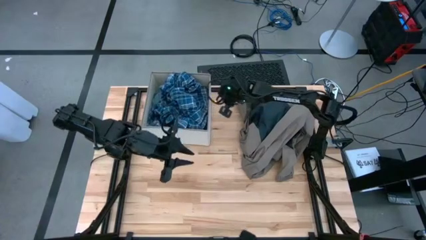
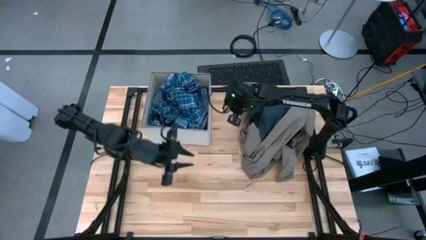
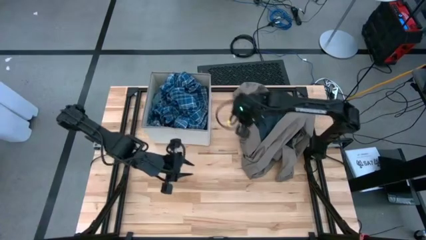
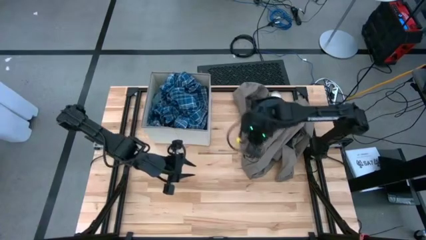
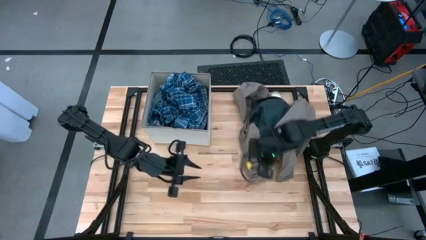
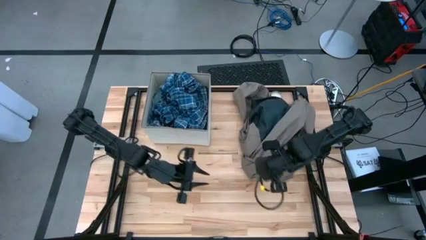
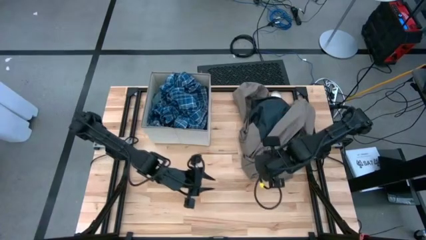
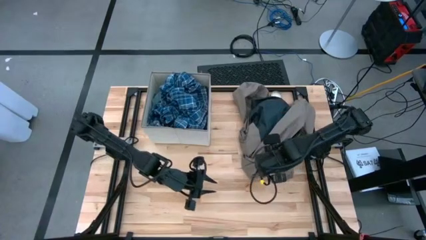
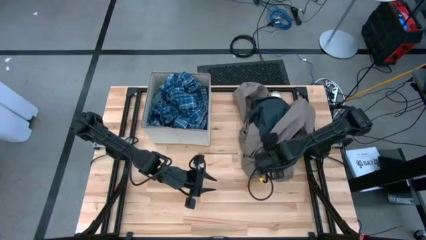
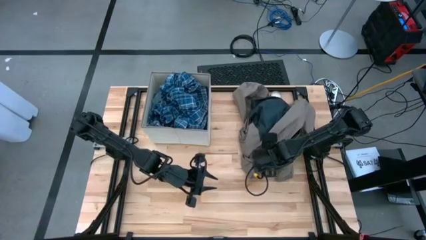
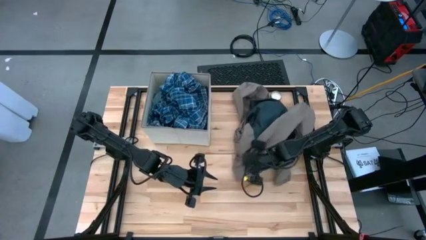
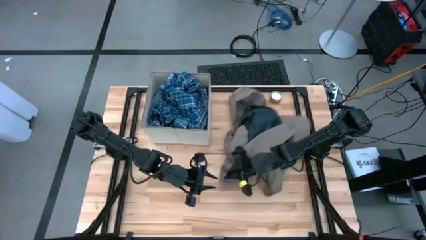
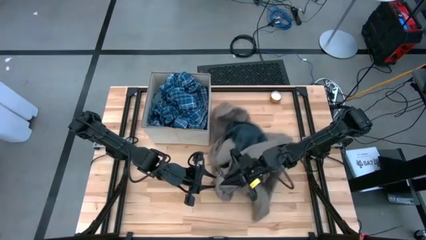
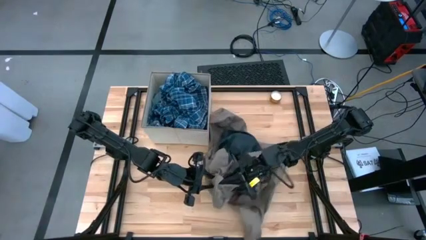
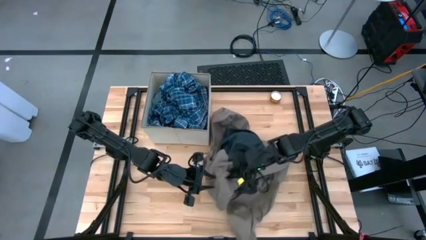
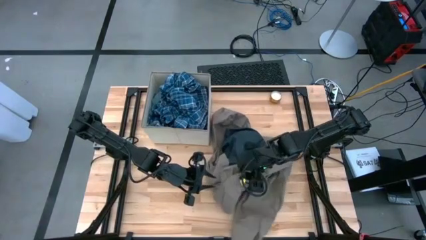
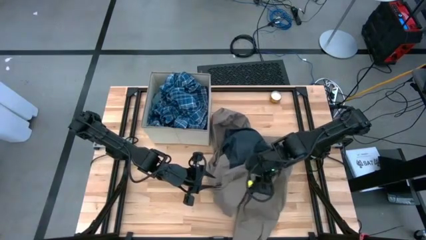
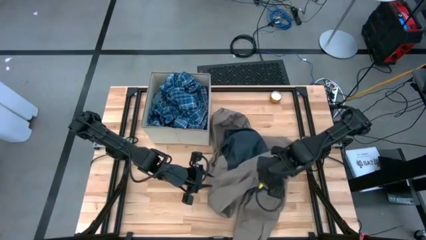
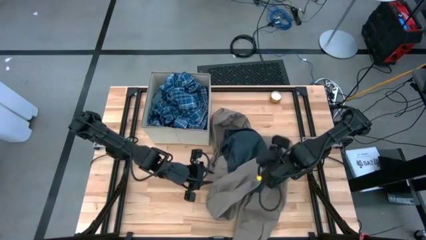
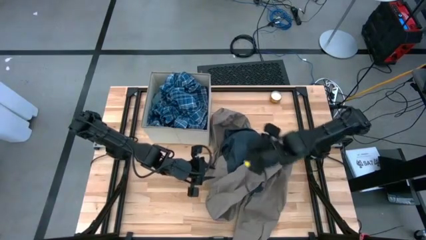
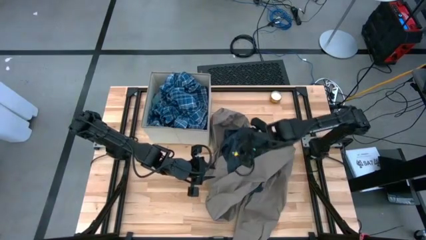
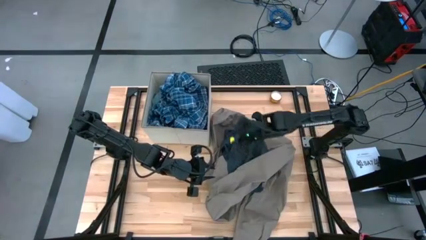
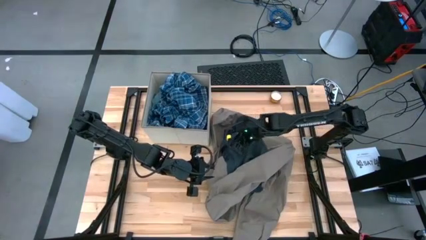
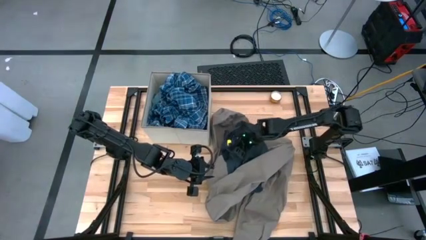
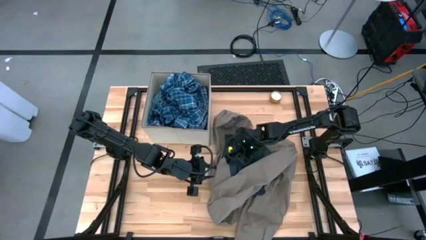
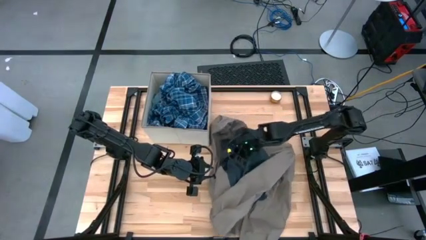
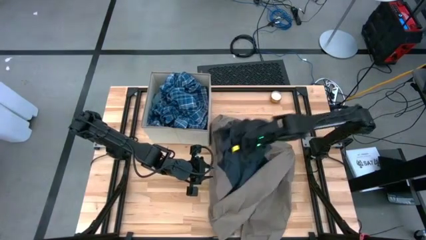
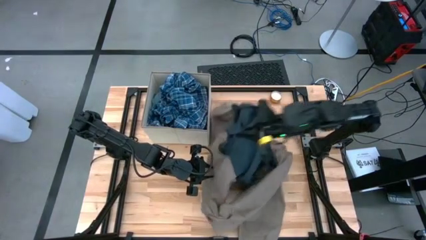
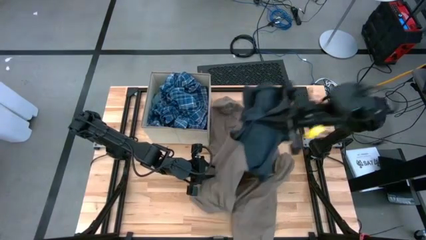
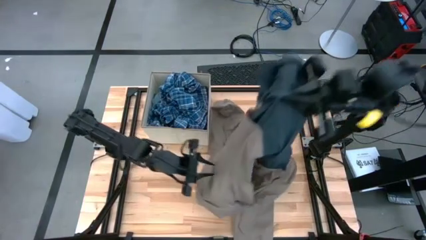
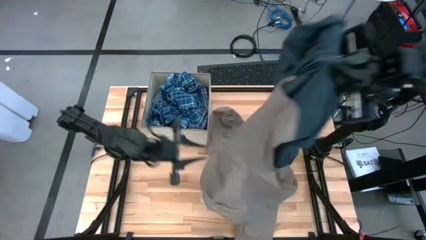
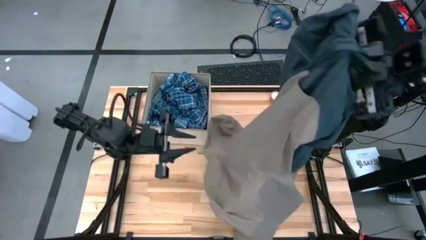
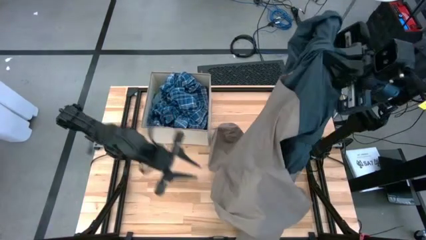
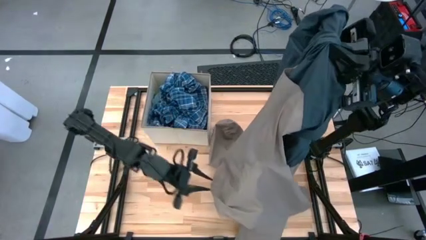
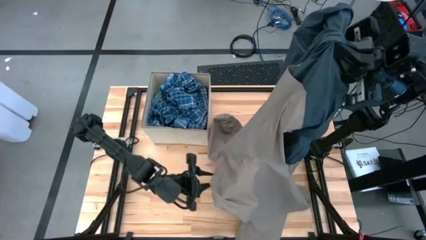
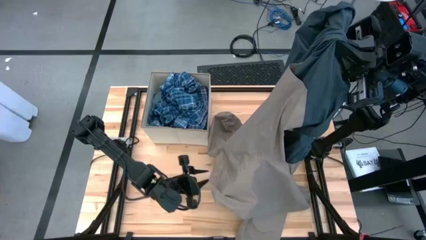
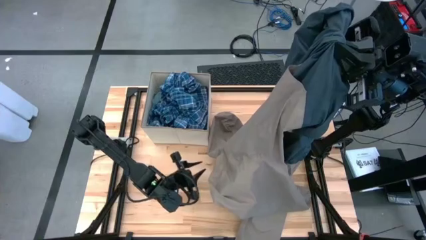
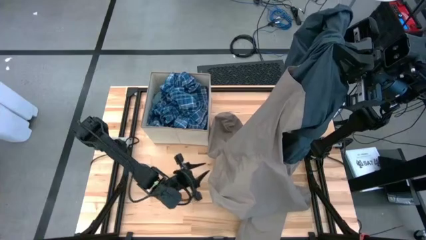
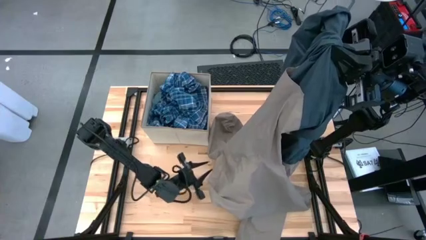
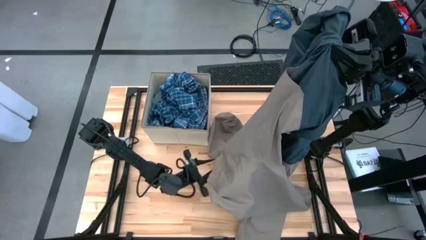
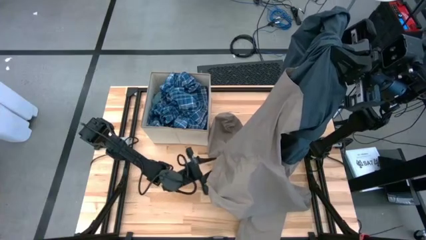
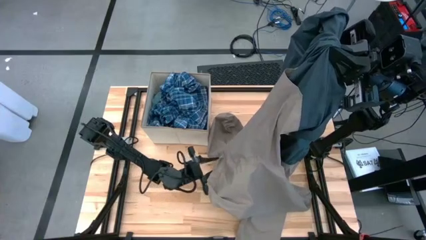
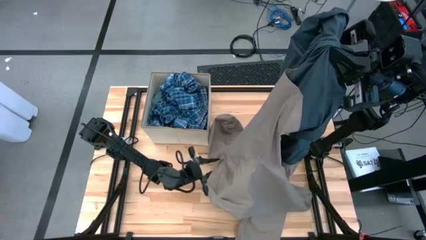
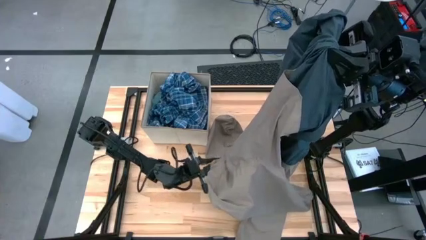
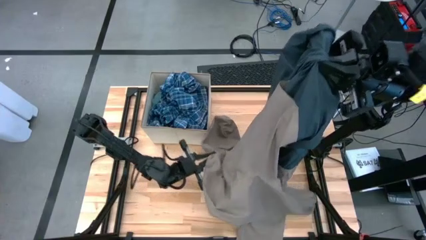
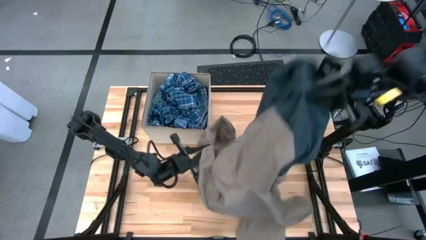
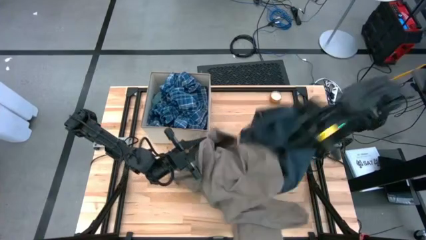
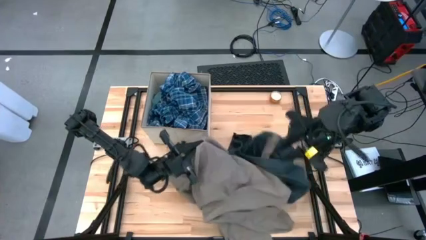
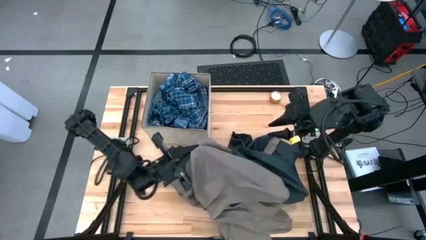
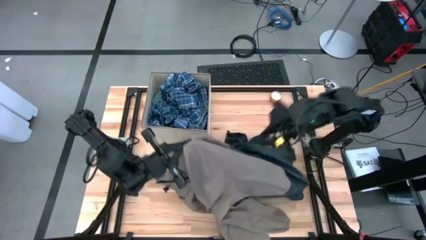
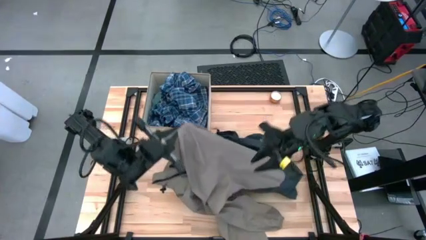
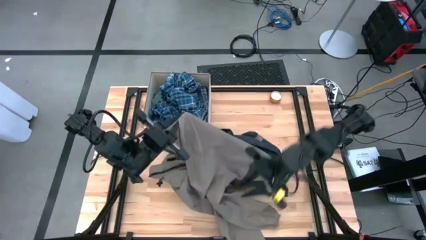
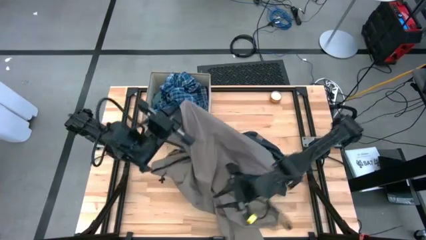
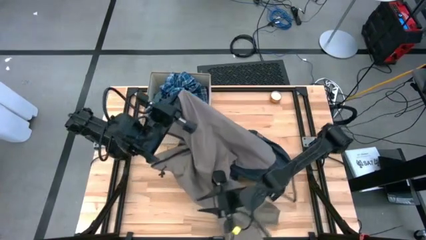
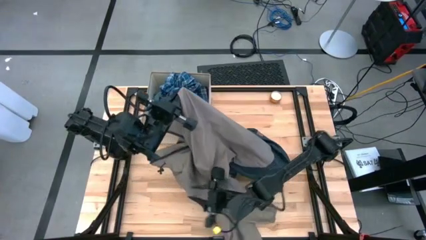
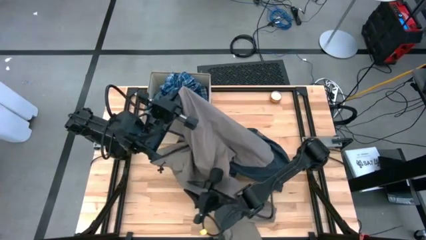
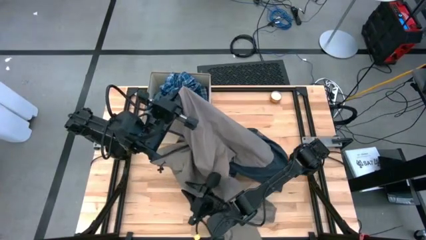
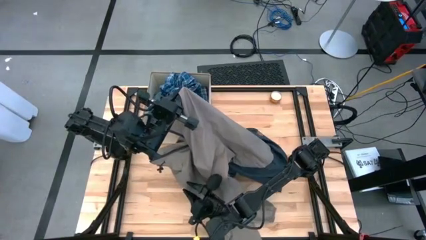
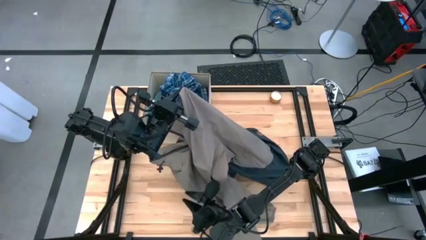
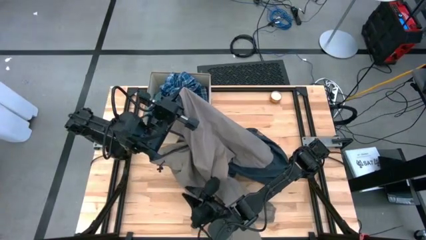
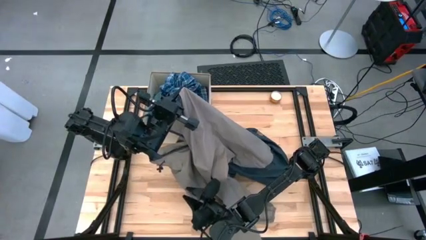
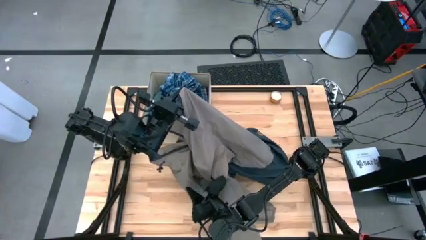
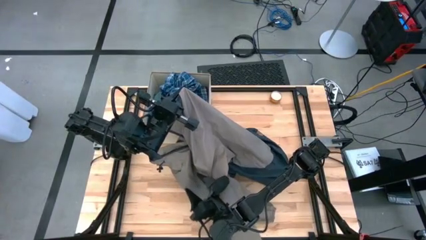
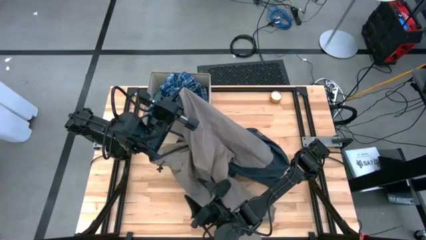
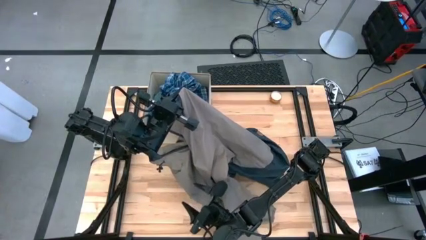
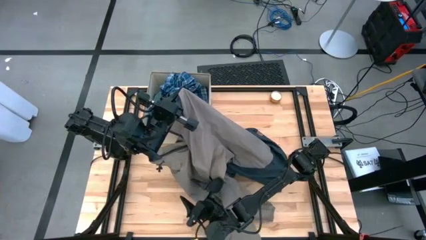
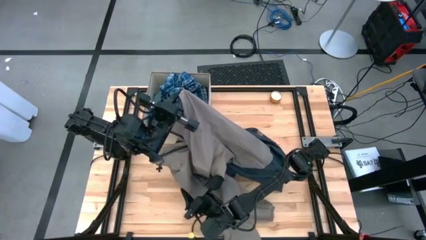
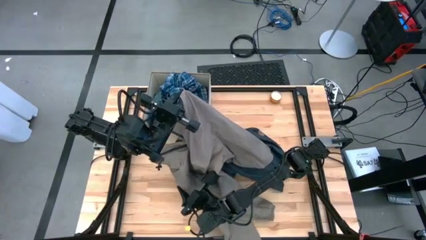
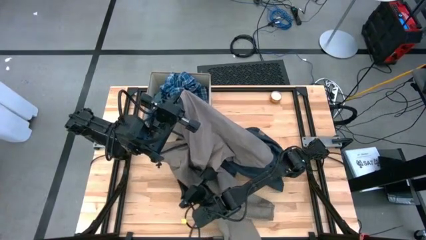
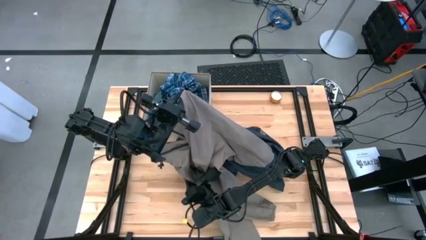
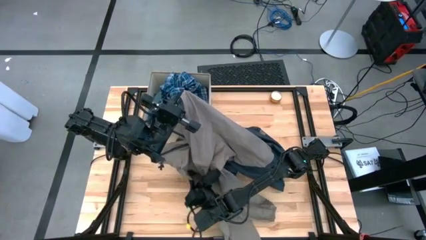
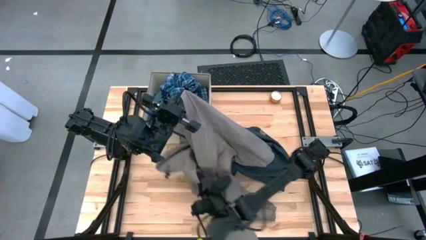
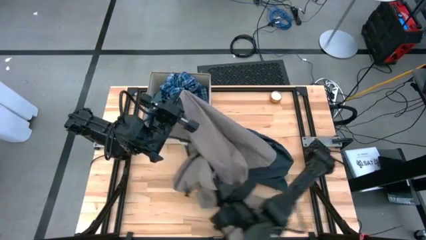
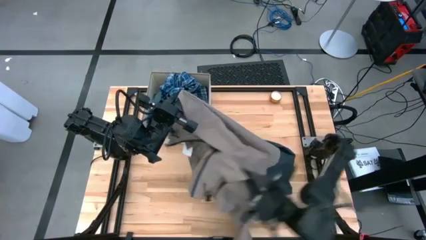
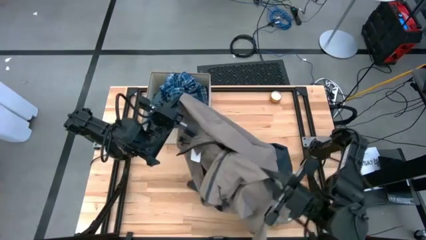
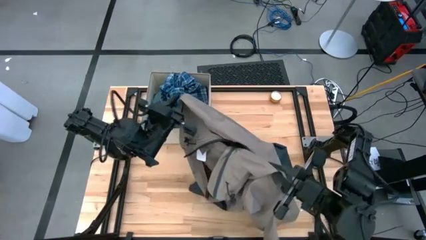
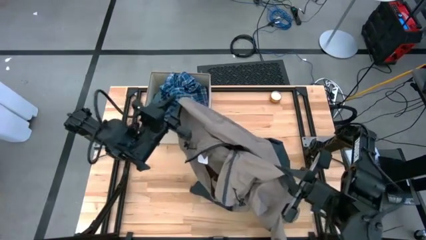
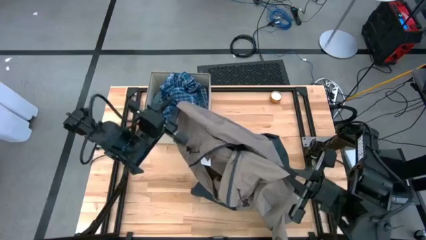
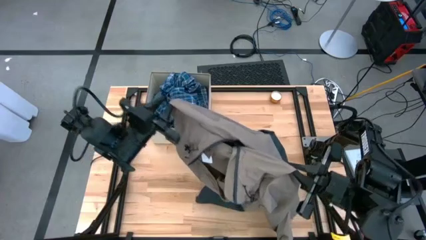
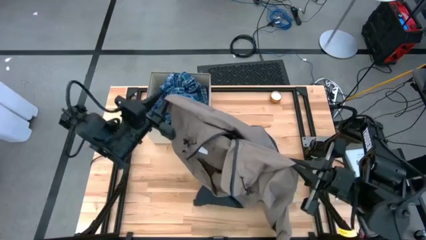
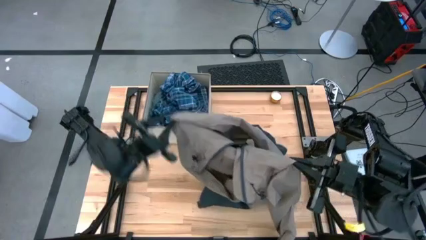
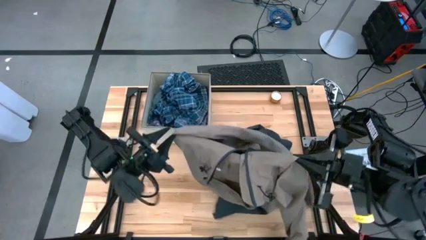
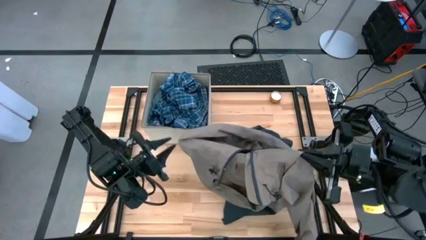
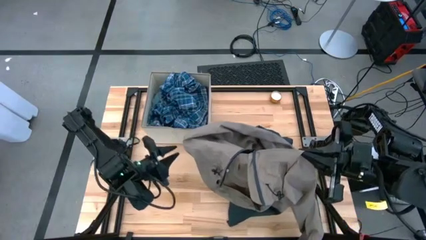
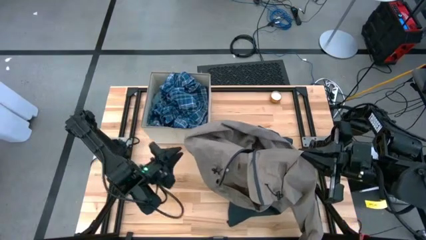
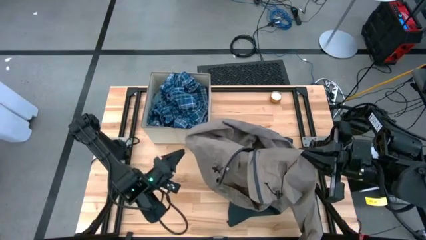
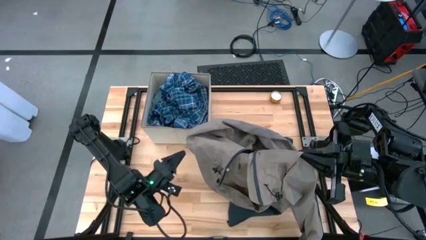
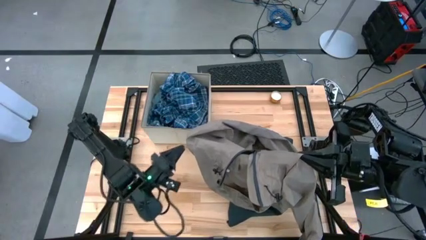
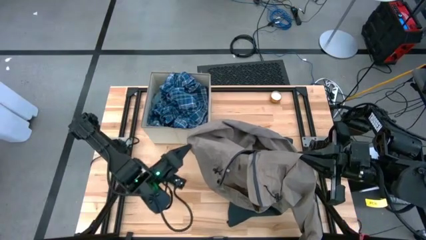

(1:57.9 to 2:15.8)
Task: Sort clothes
Put the brown jacket into the laundry organizer
